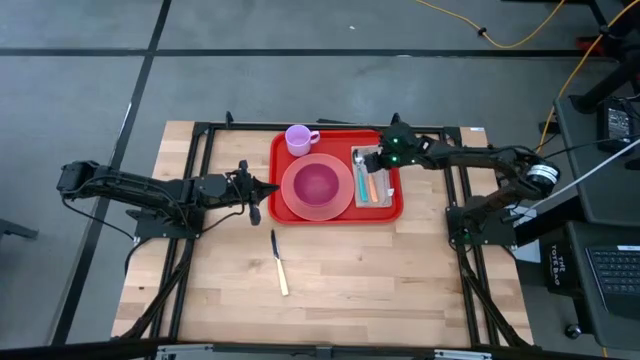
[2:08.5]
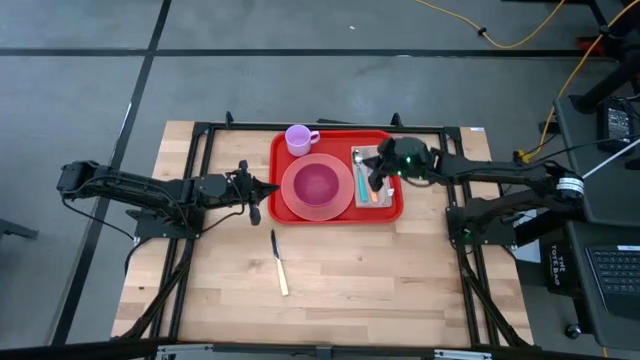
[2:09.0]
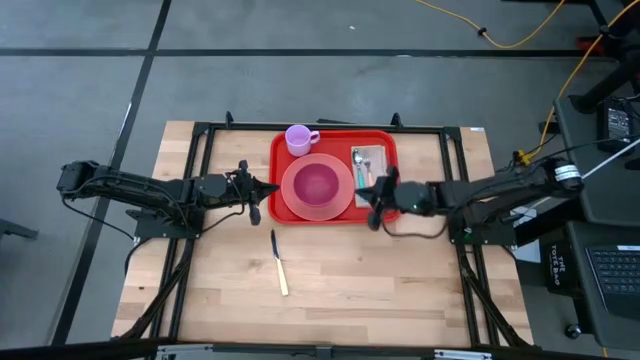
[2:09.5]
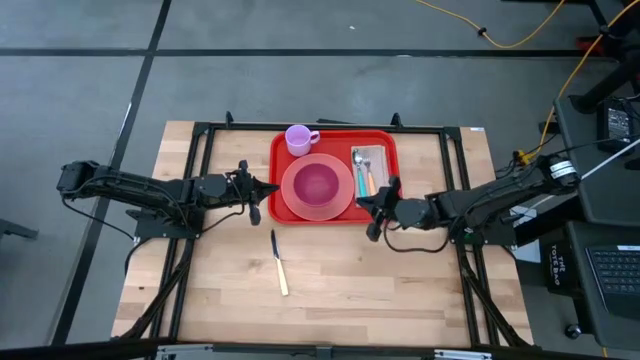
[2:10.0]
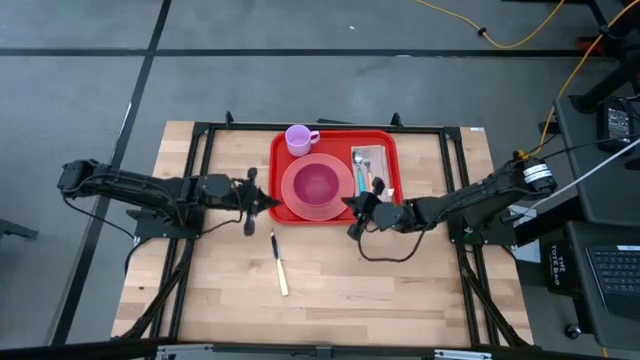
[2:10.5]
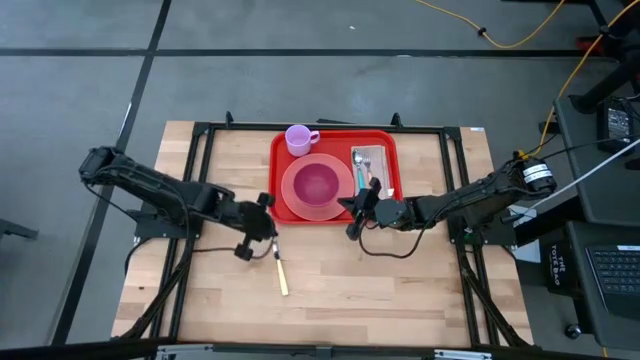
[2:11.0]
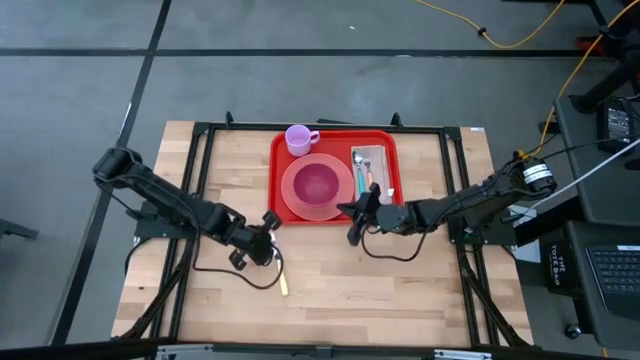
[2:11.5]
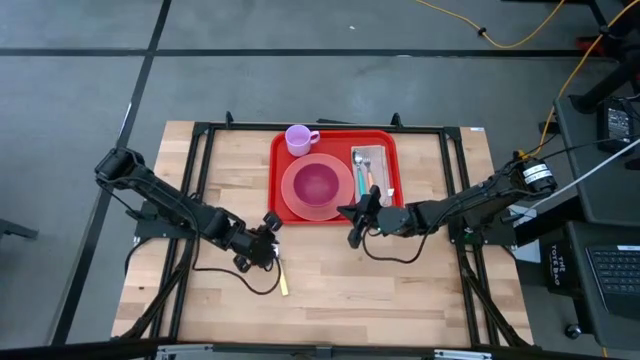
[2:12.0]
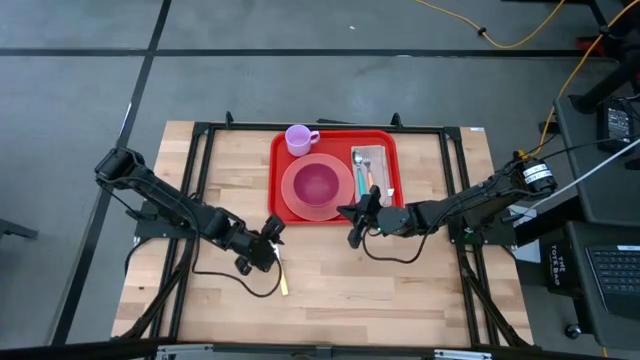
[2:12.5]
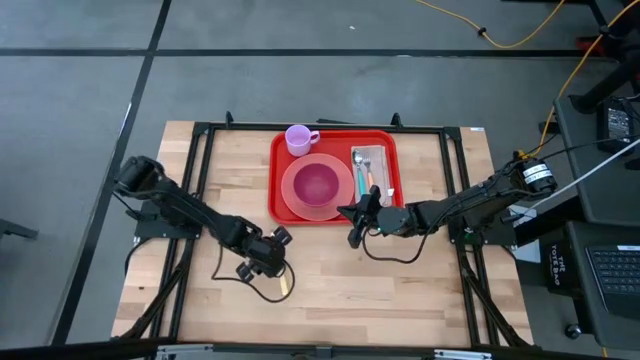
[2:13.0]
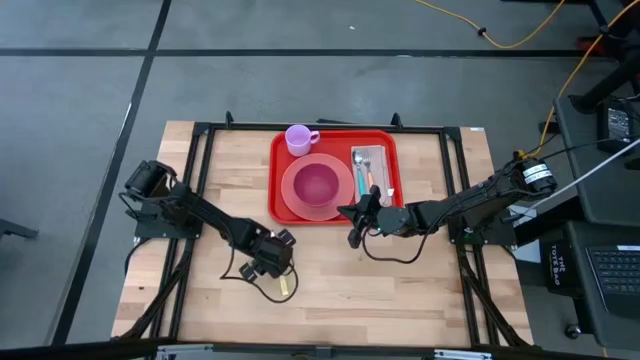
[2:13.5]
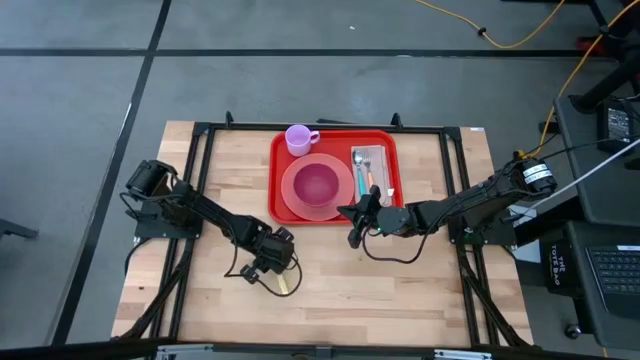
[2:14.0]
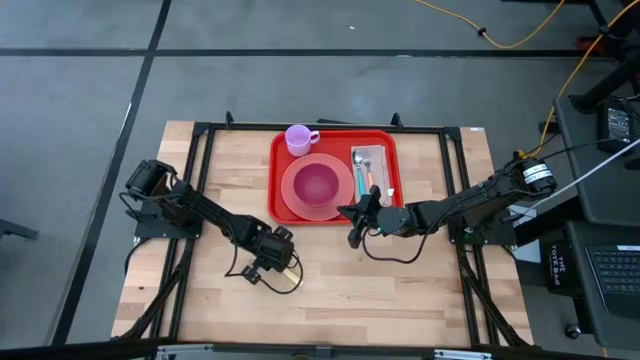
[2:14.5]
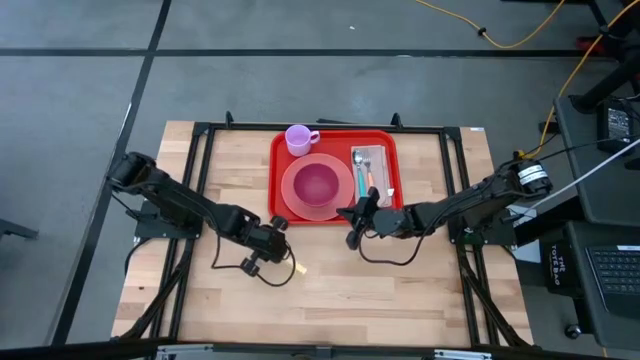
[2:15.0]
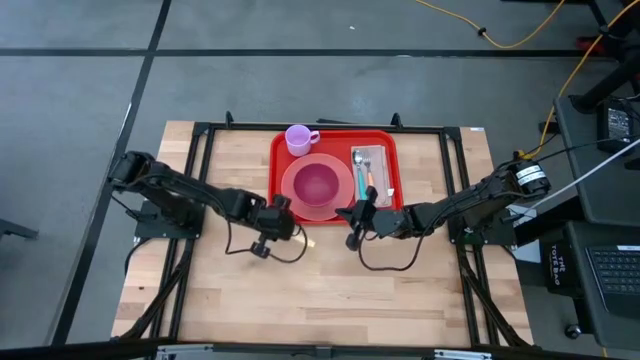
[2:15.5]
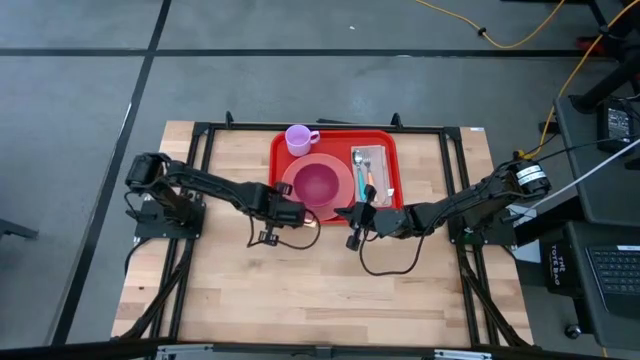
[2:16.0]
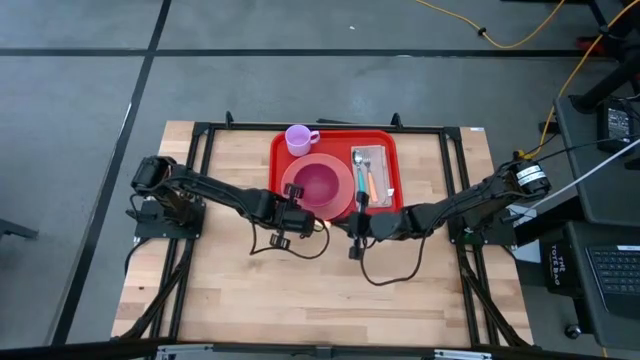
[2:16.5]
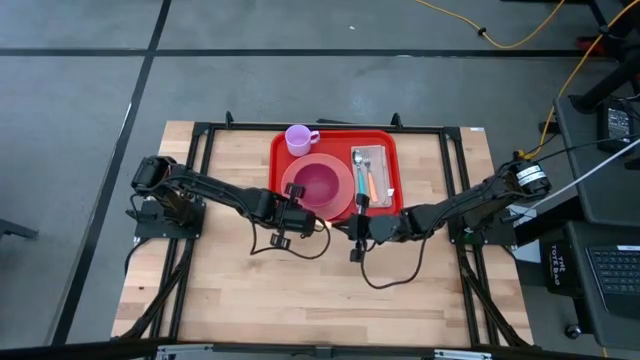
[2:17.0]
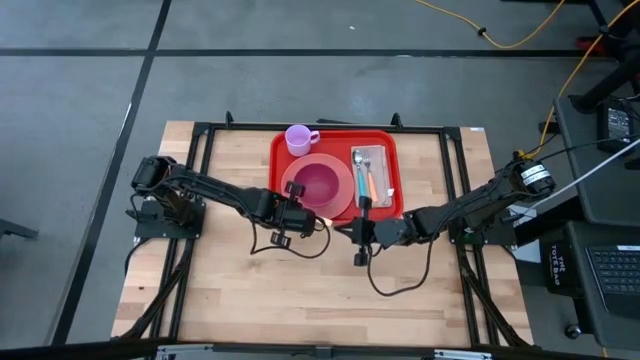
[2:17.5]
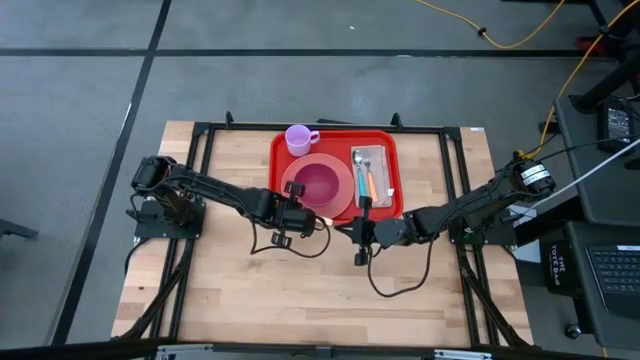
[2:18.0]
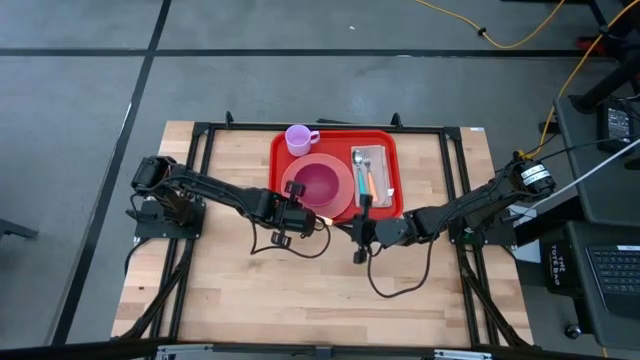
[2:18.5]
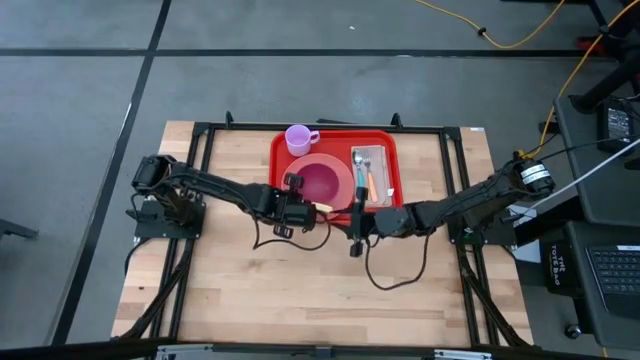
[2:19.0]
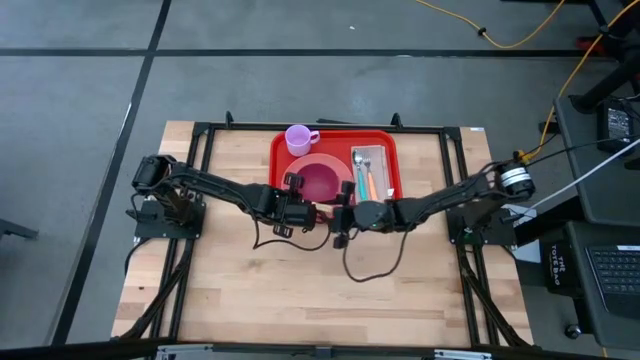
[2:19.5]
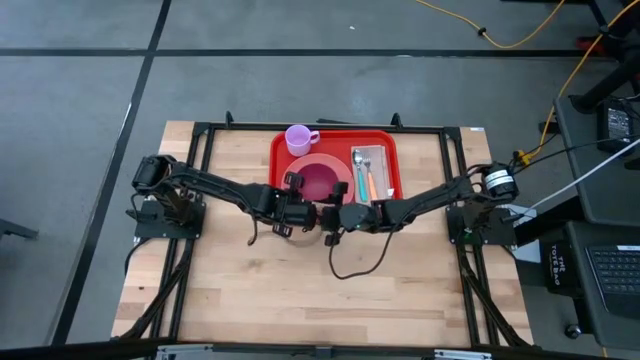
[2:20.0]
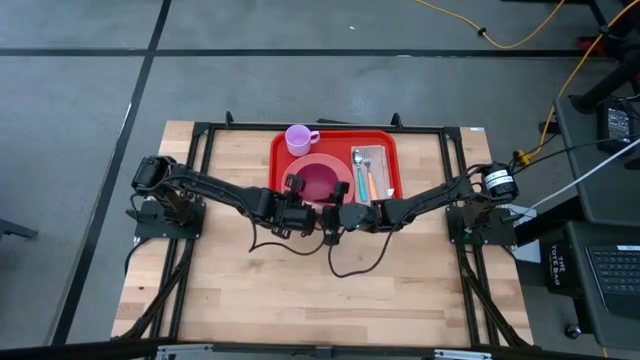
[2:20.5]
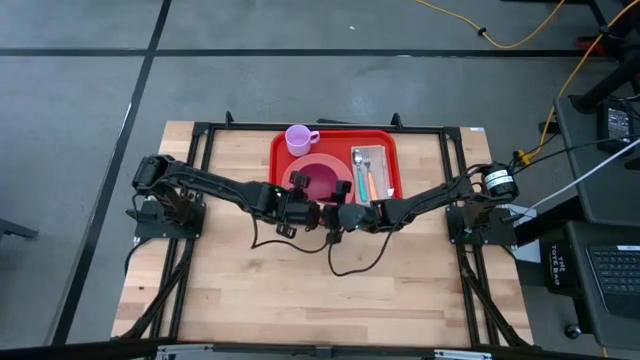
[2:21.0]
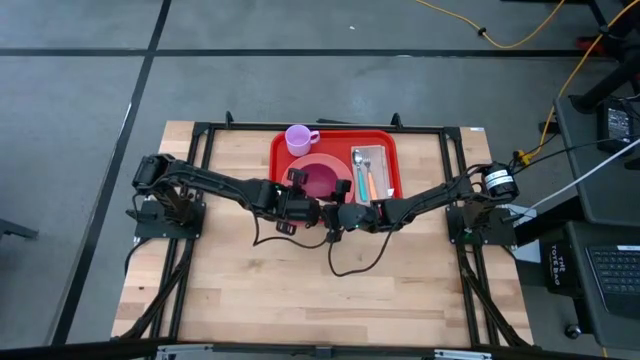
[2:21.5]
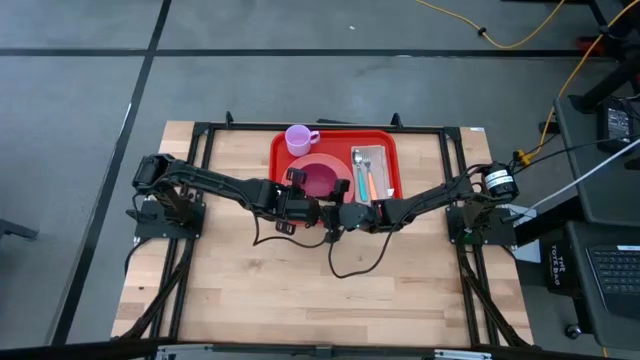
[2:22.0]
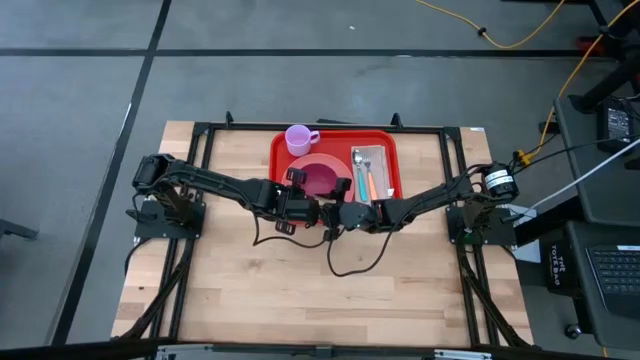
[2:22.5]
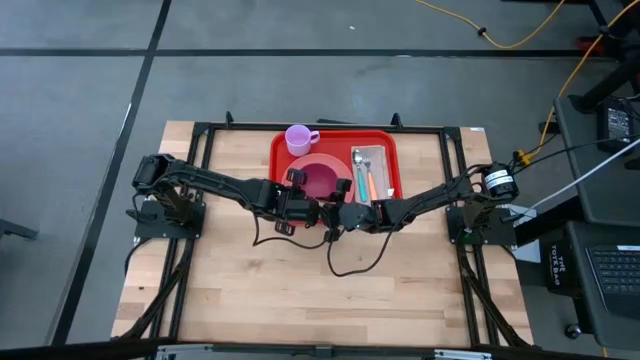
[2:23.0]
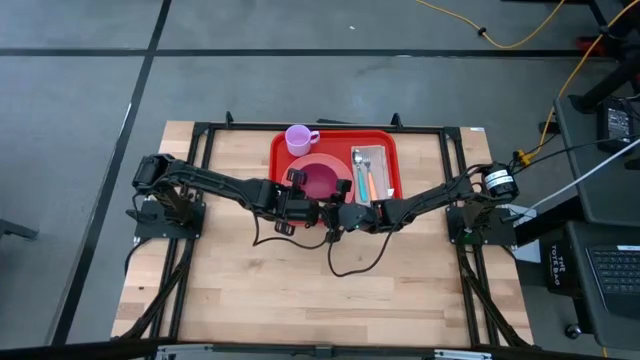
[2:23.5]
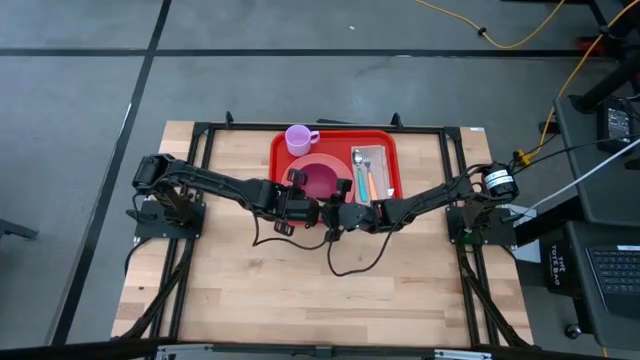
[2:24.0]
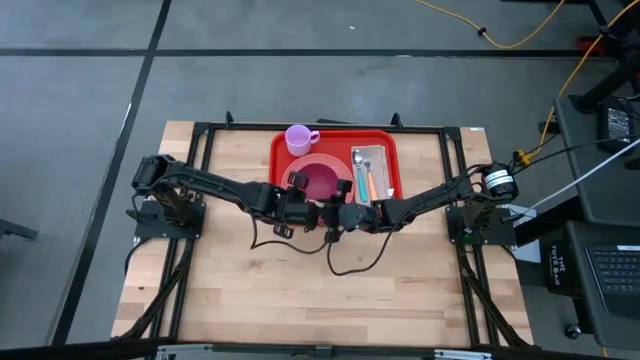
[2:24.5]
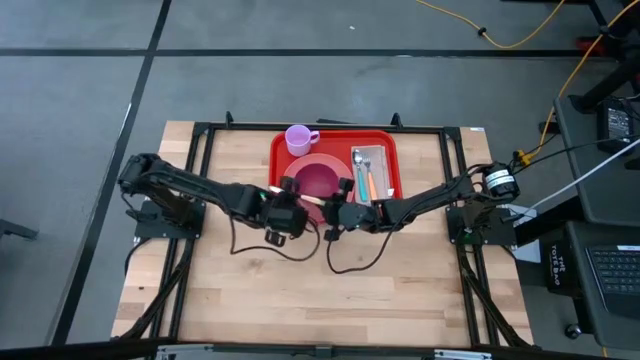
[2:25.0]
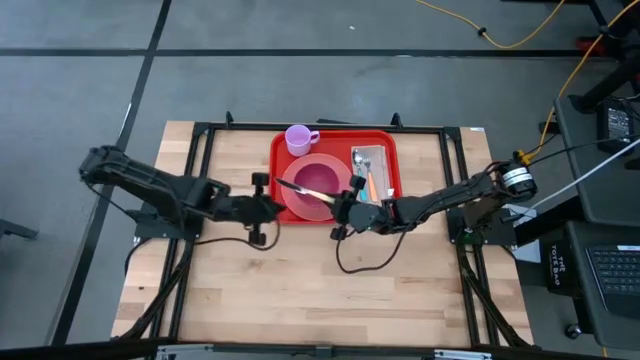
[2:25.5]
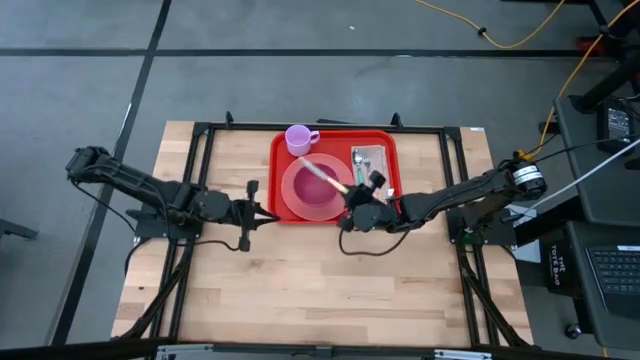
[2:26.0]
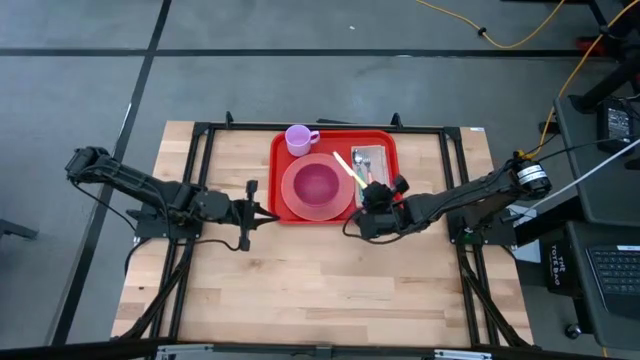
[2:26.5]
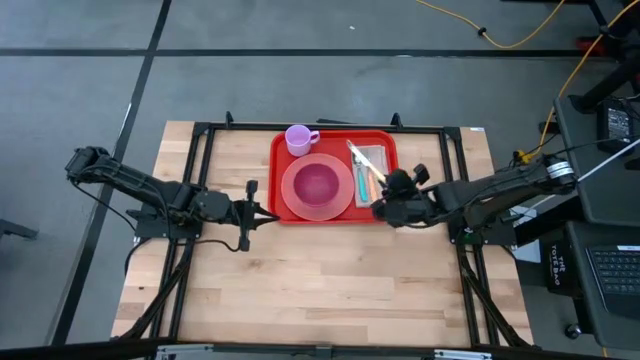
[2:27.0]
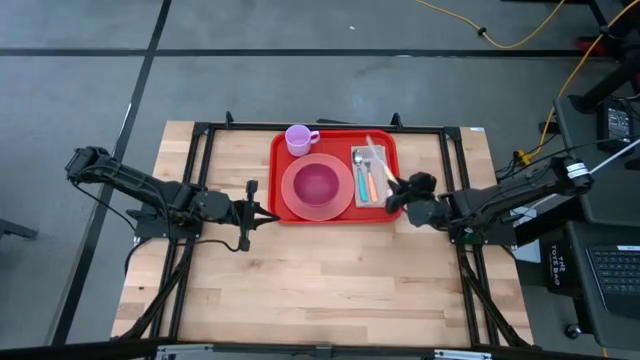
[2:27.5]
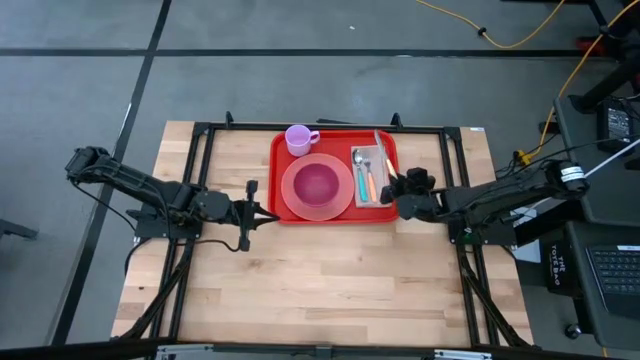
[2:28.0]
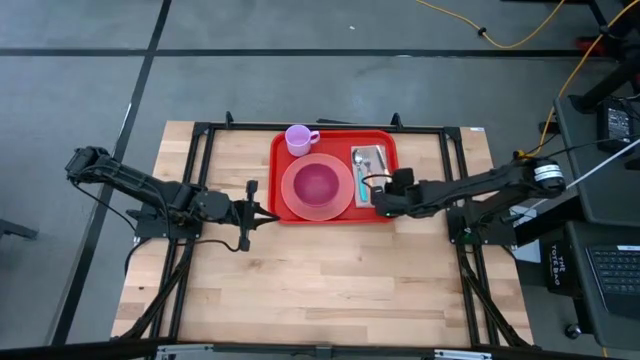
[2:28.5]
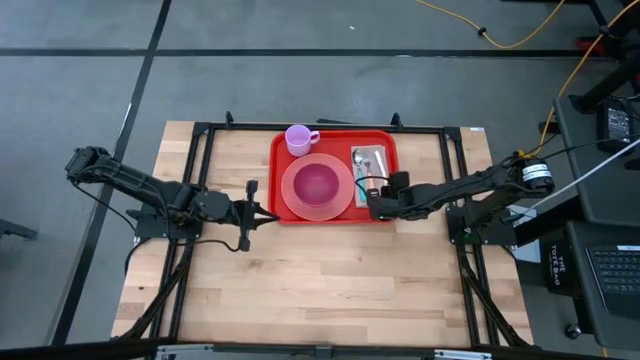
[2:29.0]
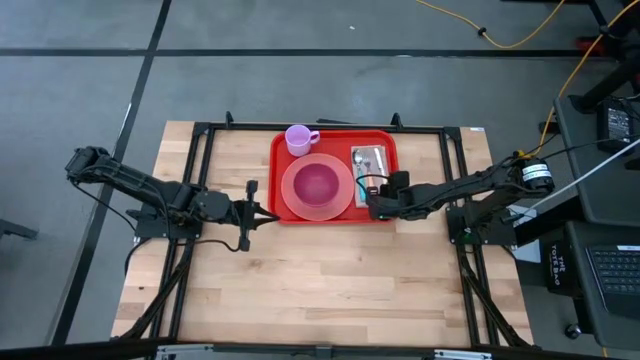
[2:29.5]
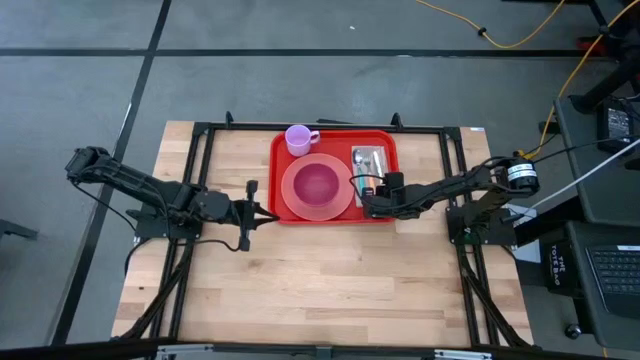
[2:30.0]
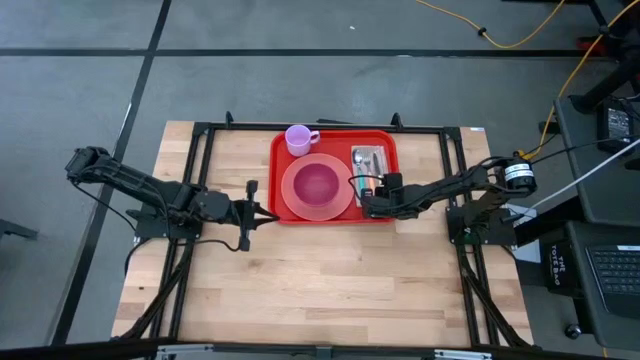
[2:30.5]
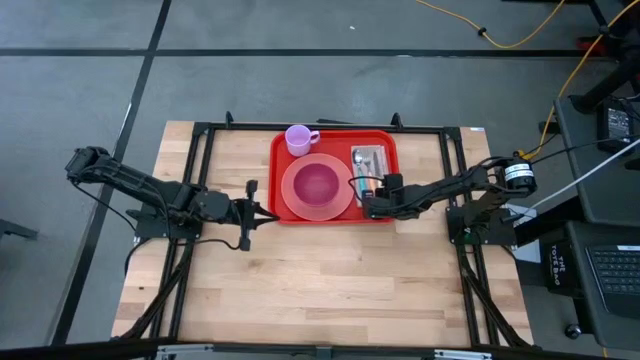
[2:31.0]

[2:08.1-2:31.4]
Task: Set up tray
Put the yellow knife on top of the brown napkin to the right of the orange fork
